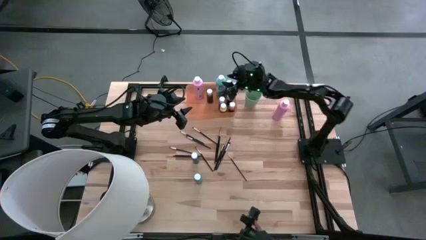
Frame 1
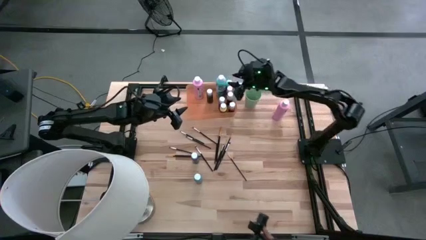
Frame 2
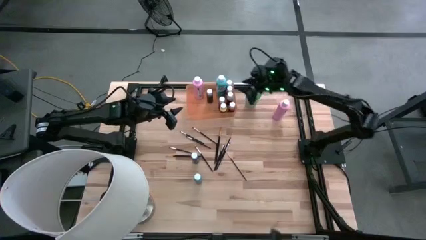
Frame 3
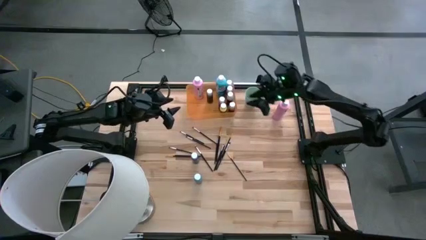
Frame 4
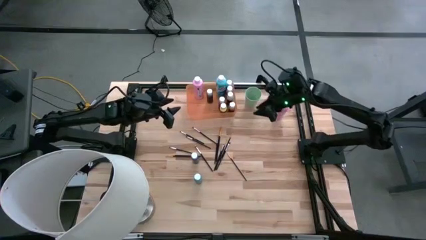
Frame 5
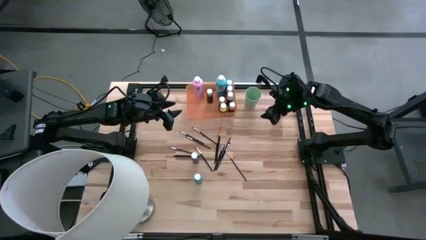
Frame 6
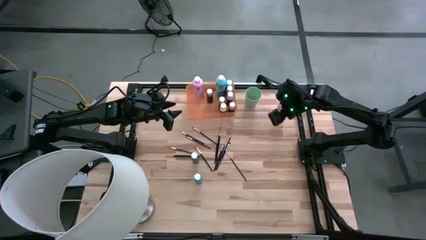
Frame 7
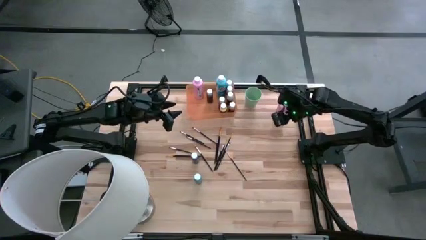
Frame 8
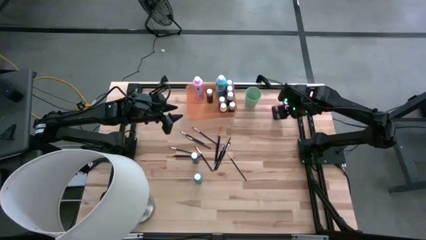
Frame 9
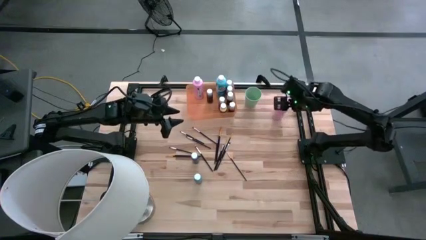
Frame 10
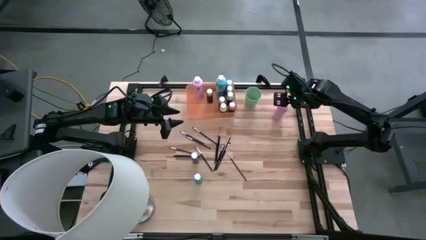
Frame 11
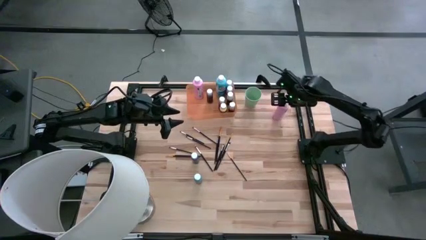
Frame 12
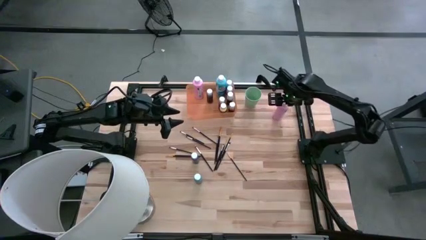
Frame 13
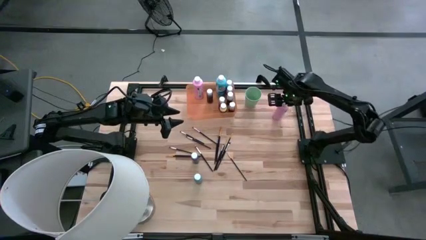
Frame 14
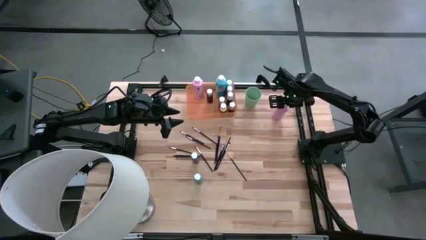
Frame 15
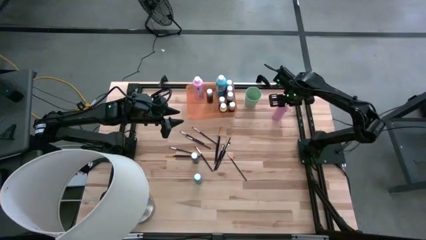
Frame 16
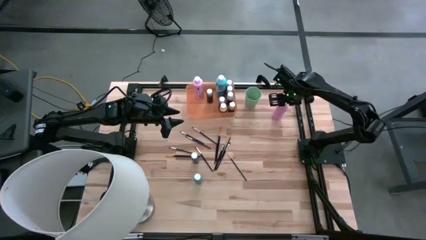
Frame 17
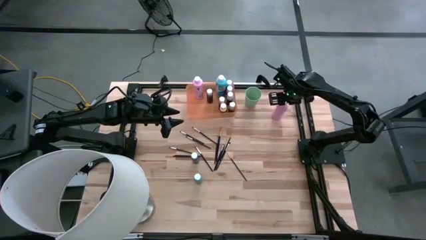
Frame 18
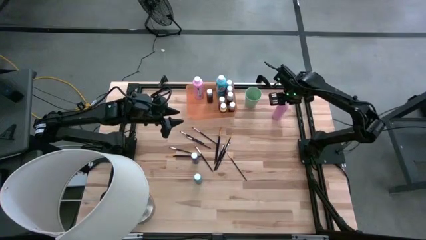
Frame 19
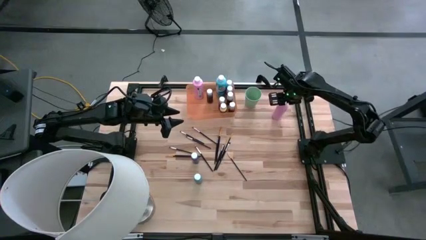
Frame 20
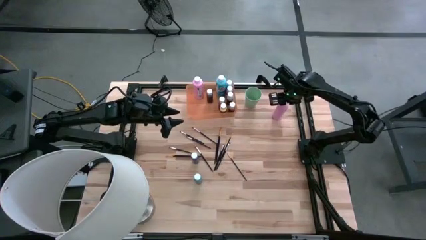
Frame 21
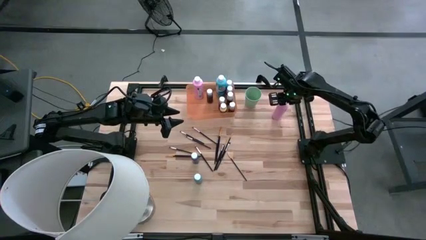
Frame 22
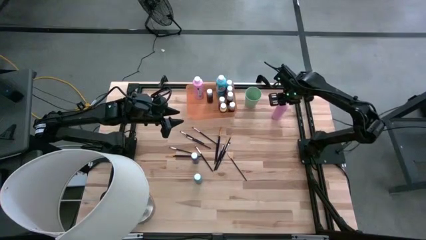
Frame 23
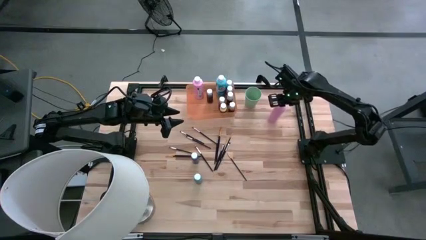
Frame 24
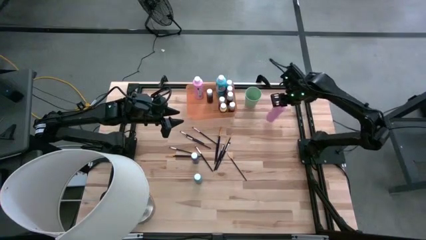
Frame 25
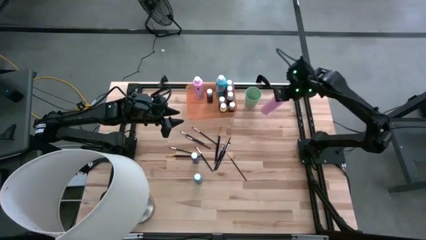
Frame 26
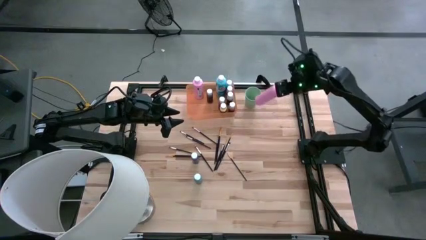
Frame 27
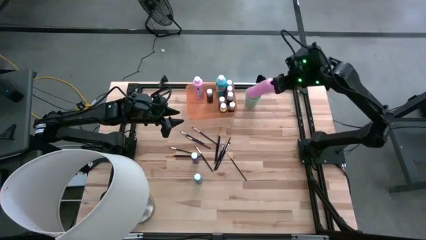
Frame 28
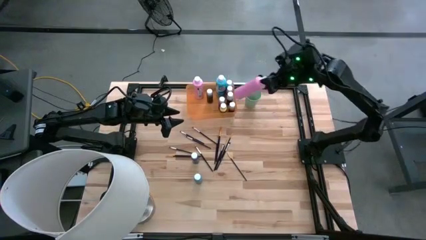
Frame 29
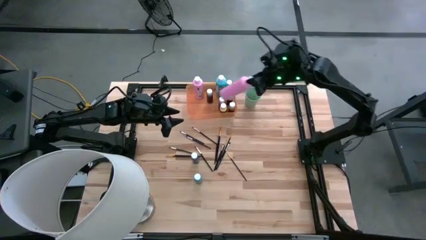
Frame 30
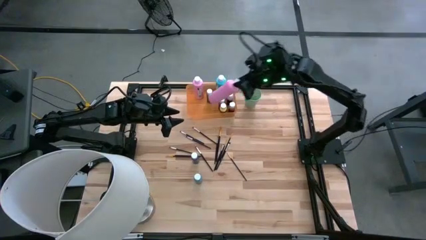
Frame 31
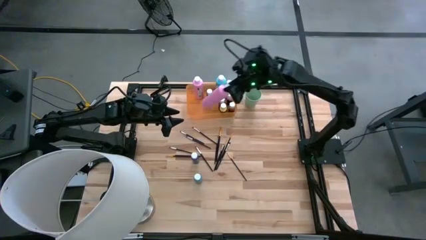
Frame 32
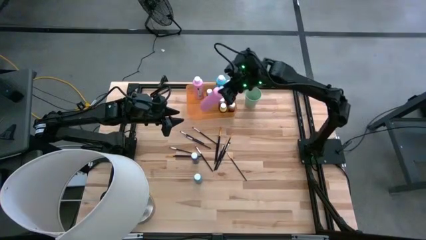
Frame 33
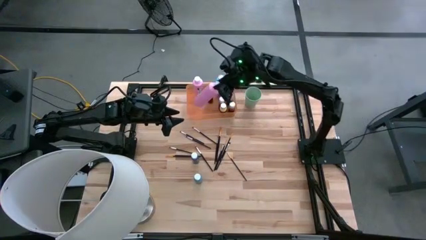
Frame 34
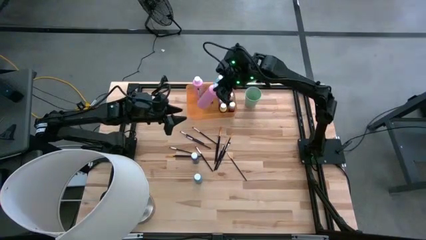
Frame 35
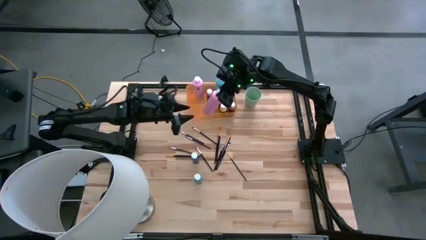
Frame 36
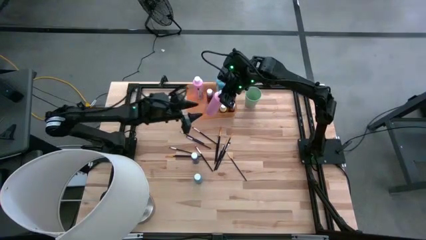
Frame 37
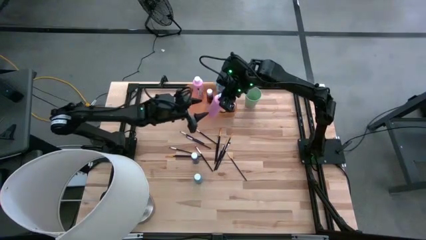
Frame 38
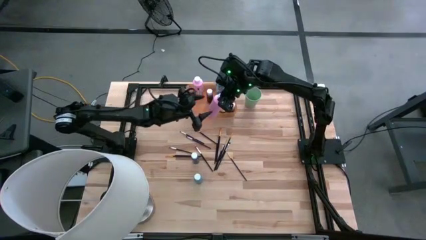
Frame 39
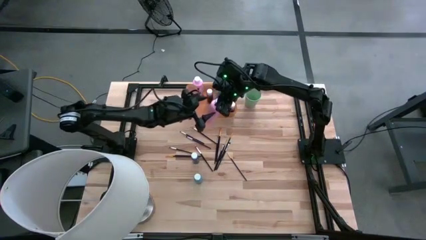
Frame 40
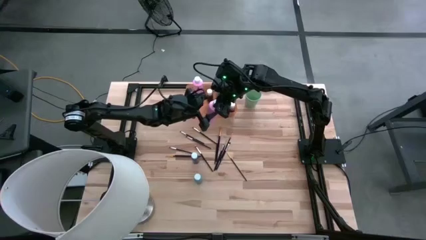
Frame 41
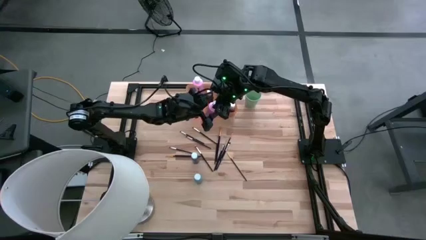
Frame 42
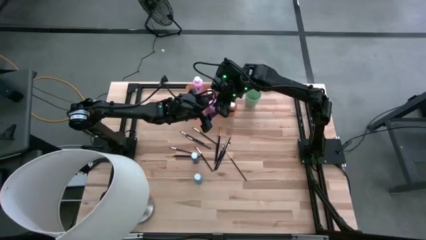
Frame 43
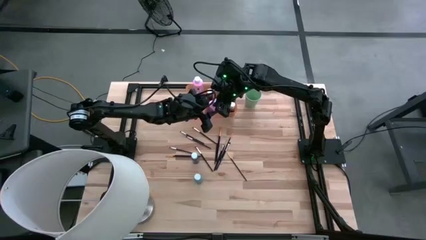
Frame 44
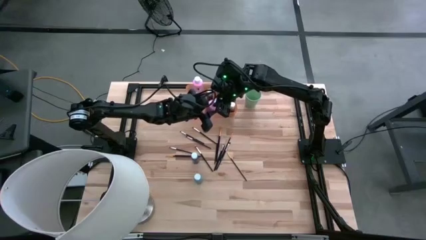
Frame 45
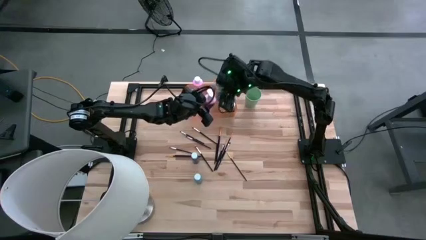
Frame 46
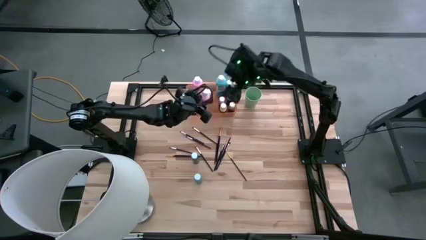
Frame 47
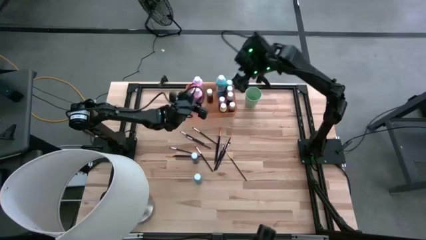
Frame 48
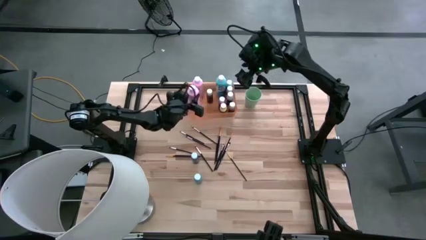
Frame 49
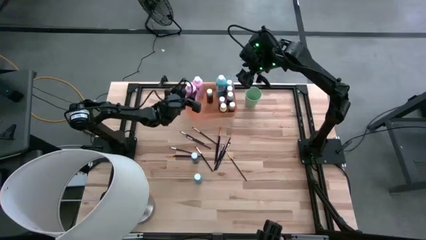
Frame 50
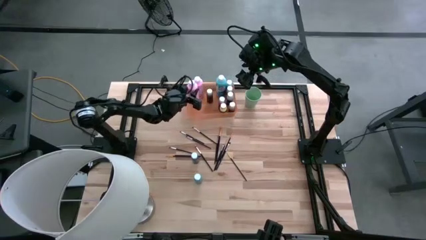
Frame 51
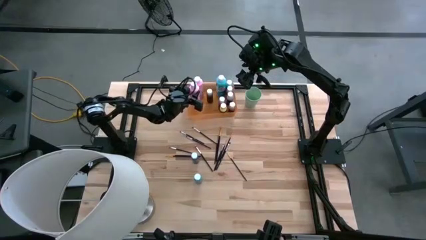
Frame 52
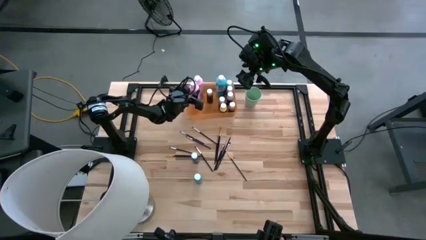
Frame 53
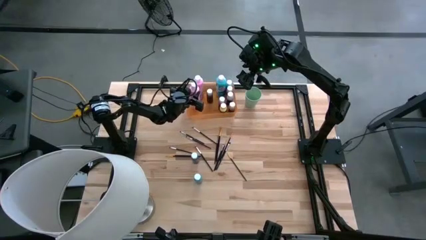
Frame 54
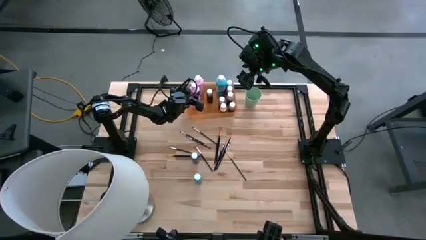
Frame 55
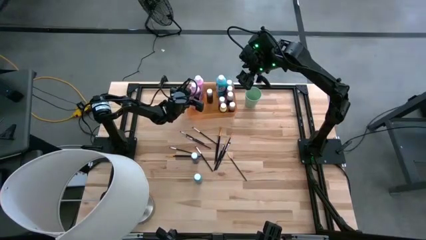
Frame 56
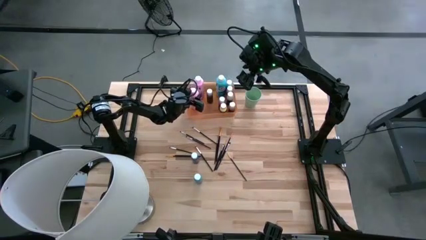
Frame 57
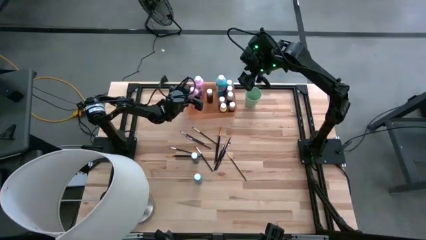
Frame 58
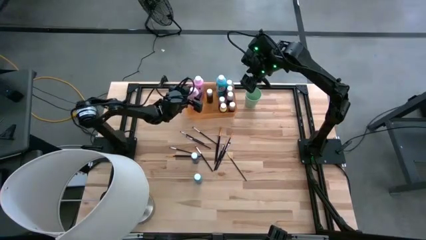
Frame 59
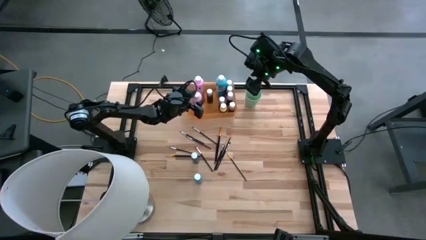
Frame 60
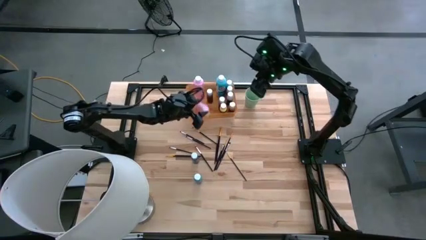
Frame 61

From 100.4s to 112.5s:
Task: Pick & Place Paint Supplies
Put the large pink paint bottle into the orange bin

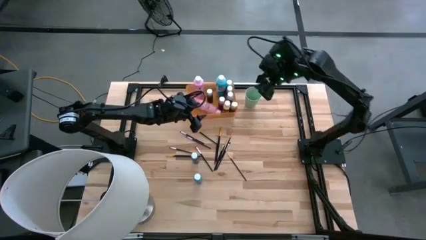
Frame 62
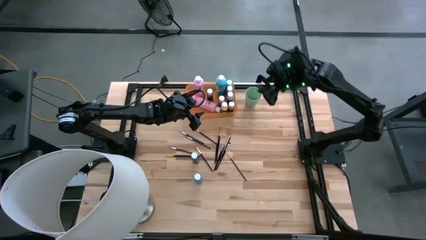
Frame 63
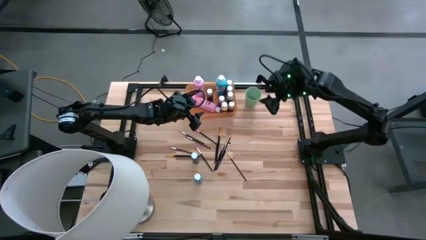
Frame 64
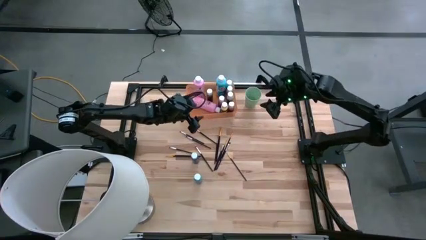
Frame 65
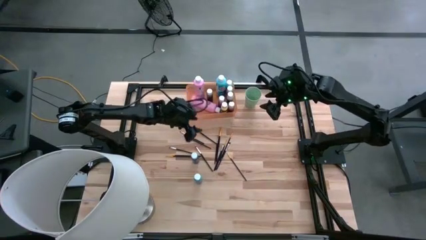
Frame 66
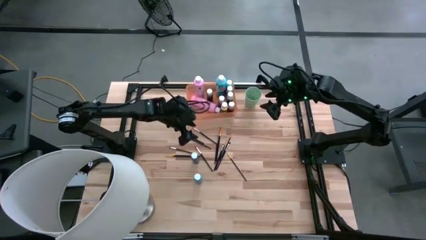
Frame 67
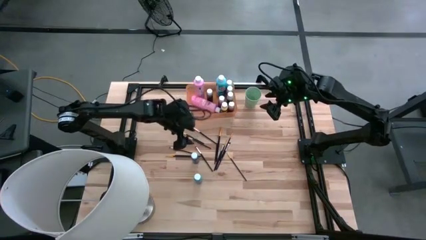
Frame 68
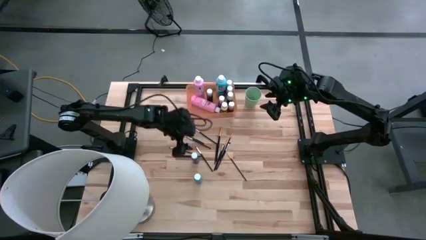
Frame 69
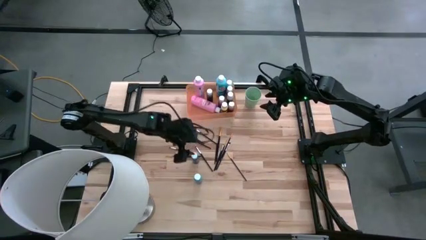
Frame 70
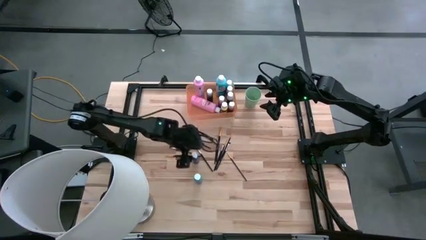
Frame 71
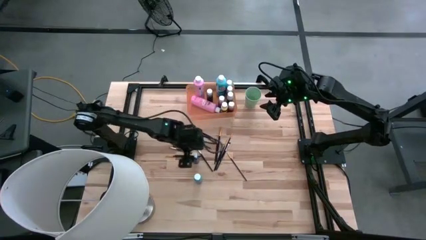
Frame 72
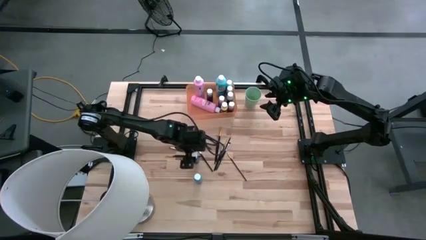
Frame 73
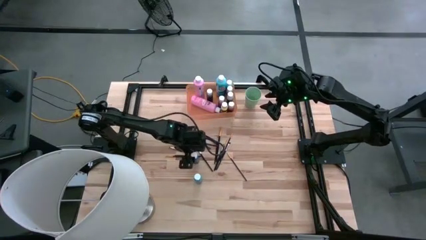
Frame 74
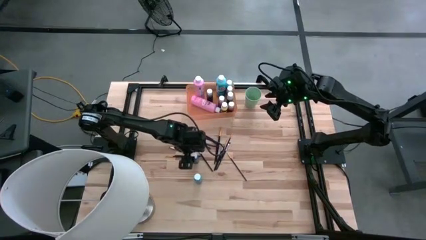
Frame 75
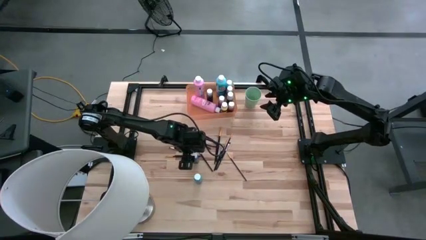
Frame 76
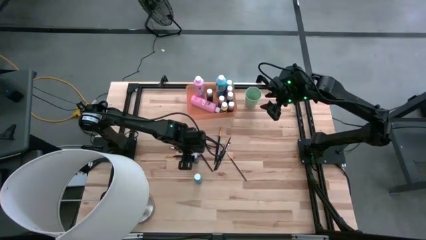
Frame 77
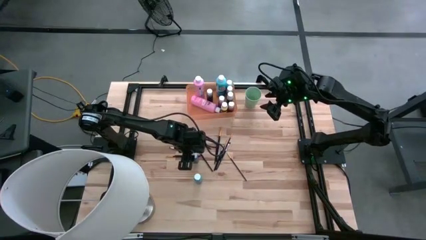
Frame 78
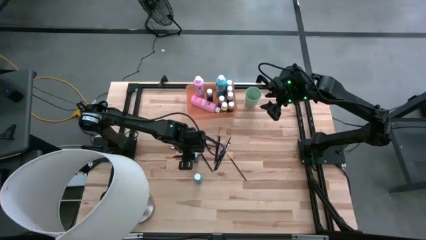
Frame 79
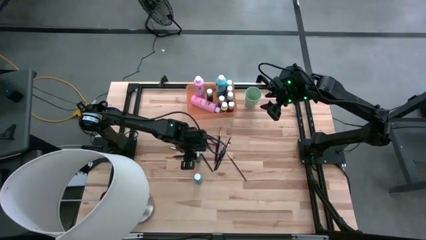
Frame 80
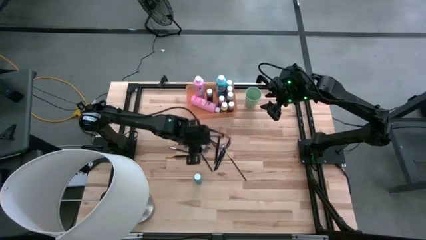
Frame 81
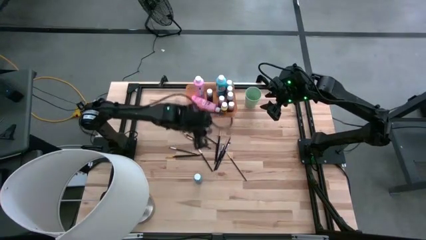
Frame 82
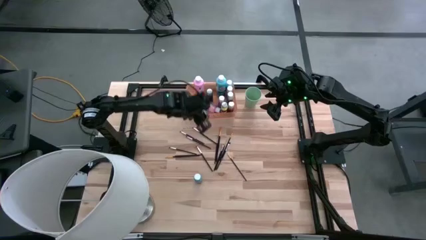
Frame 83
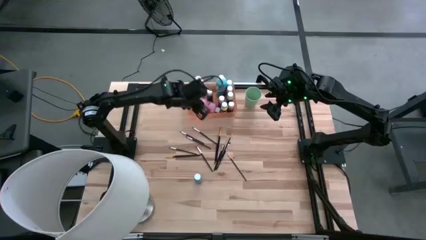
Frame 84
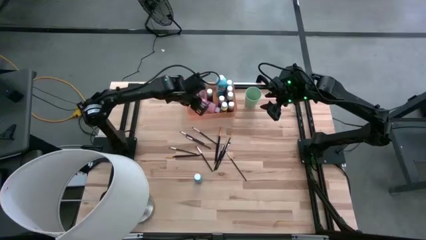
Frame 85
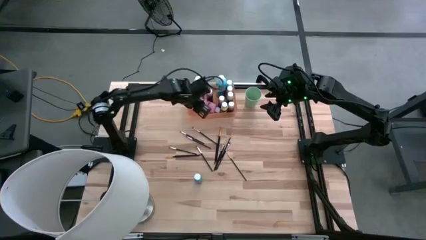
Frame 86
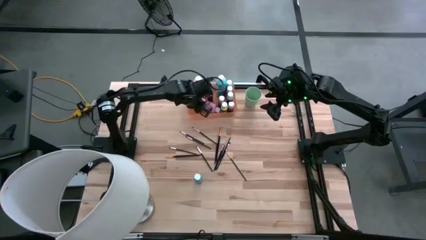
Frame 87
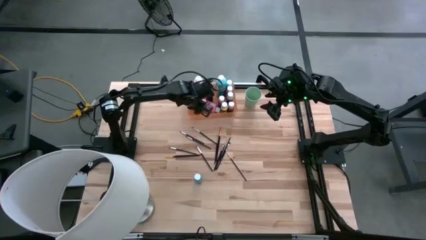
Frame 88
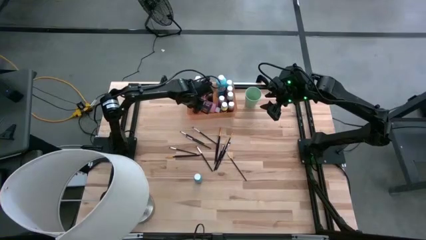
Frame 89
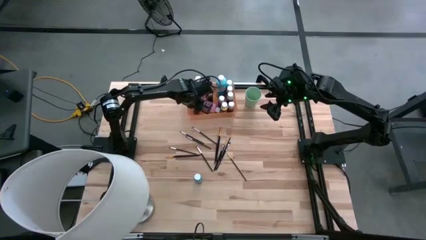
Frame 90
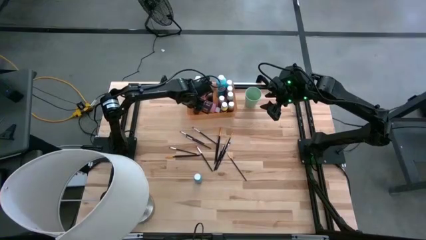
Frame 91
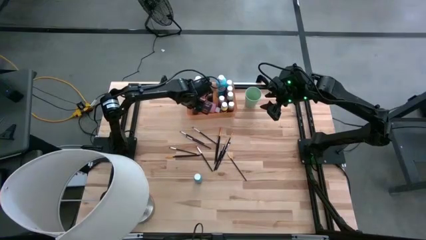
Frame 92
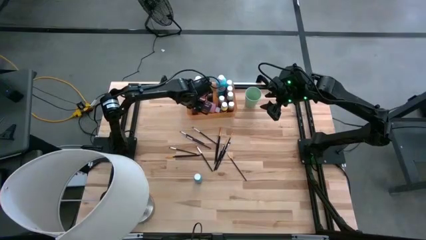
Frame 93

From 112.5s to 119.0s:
Put the small dark blue paint bottle into the orange bin
